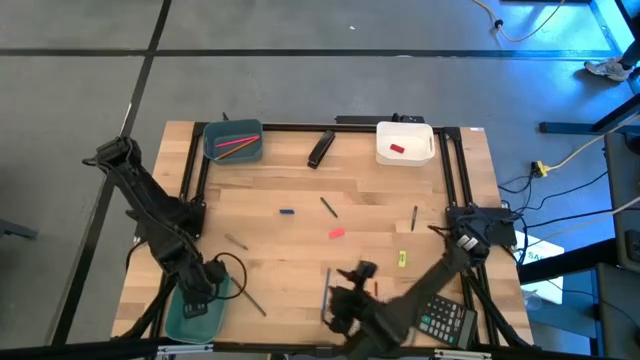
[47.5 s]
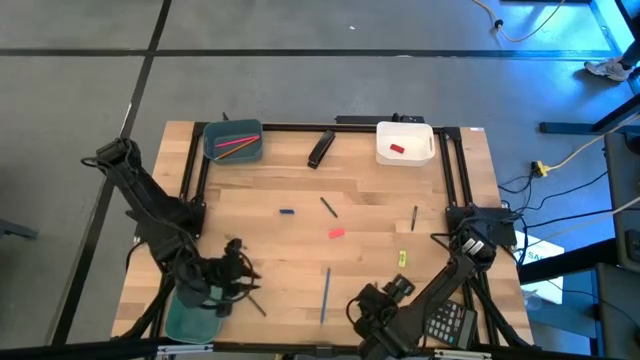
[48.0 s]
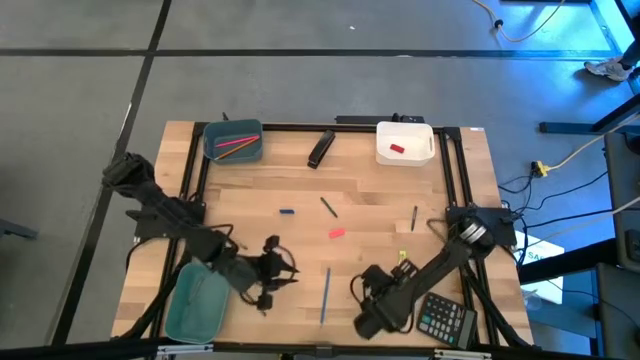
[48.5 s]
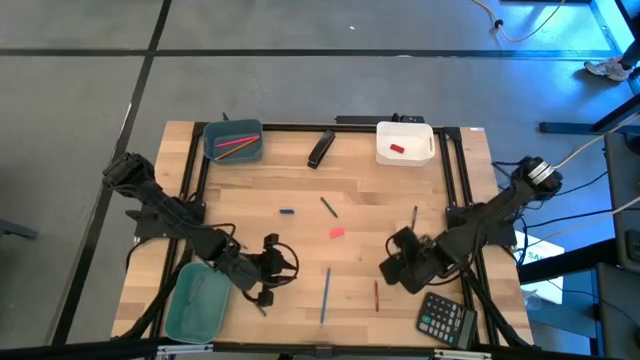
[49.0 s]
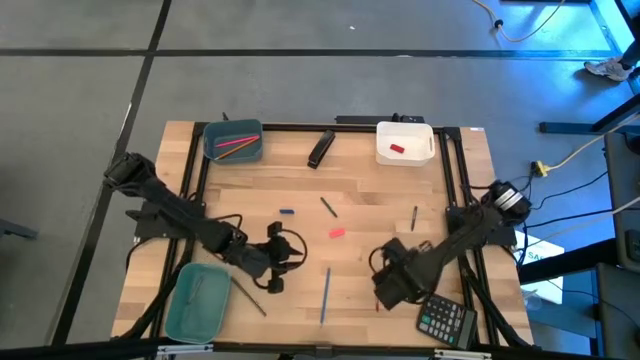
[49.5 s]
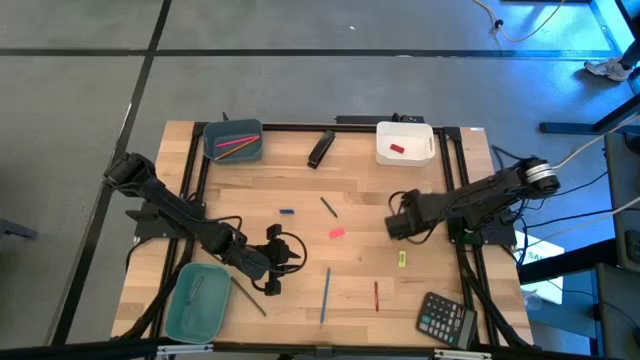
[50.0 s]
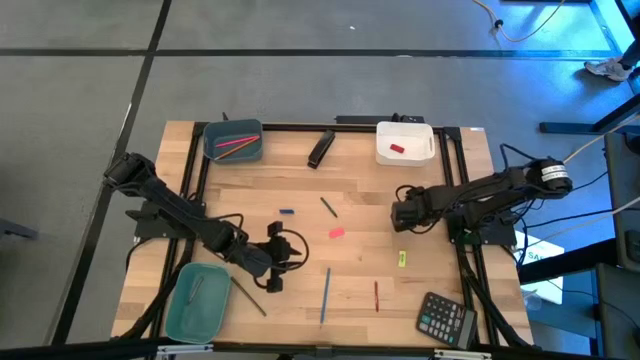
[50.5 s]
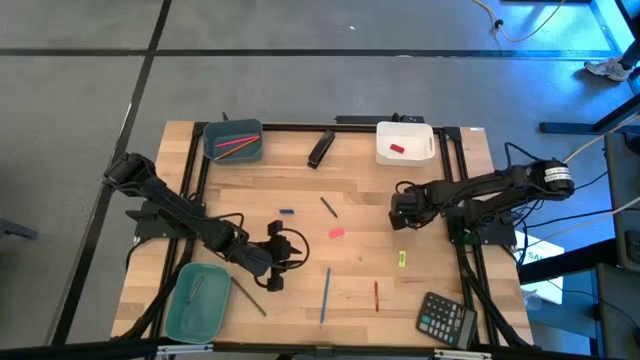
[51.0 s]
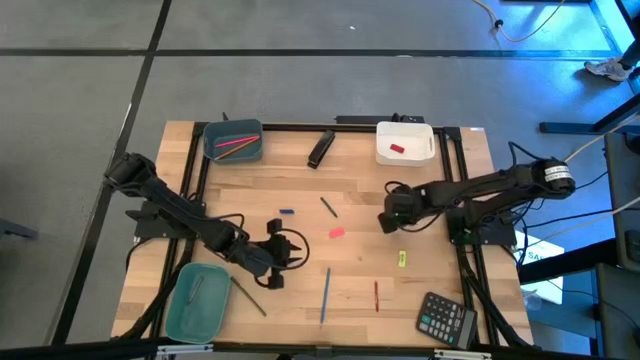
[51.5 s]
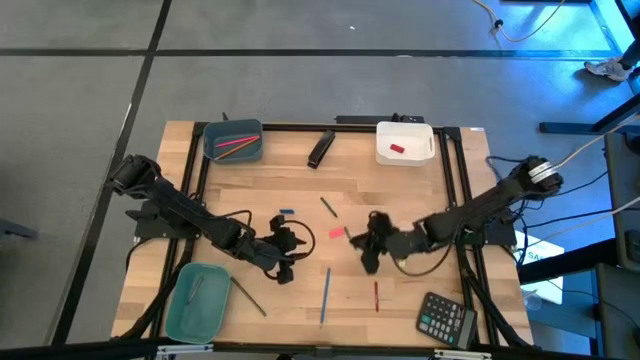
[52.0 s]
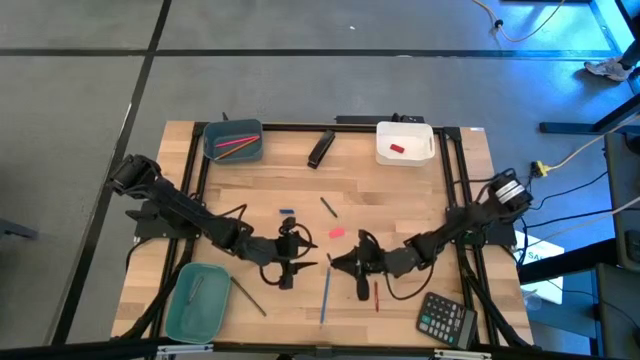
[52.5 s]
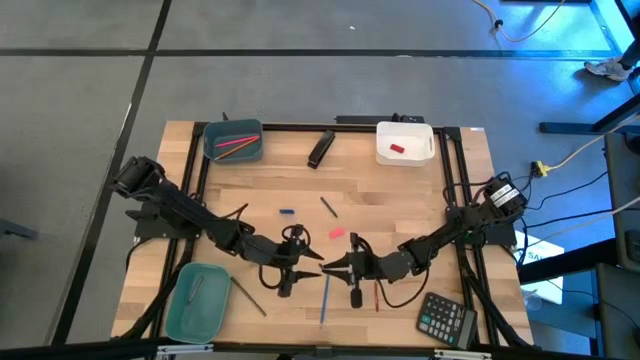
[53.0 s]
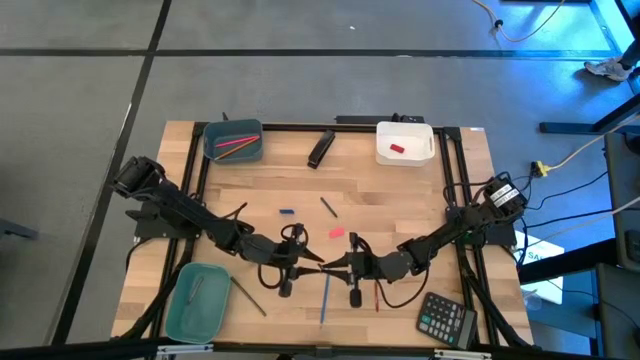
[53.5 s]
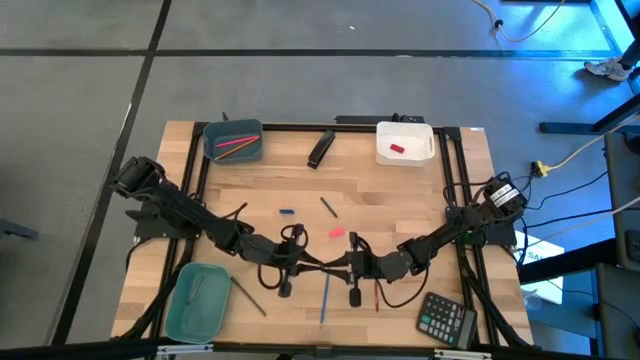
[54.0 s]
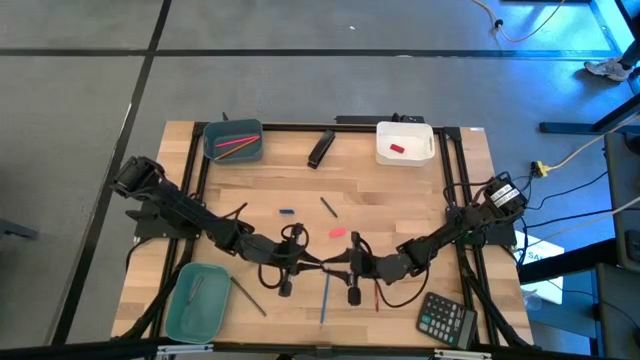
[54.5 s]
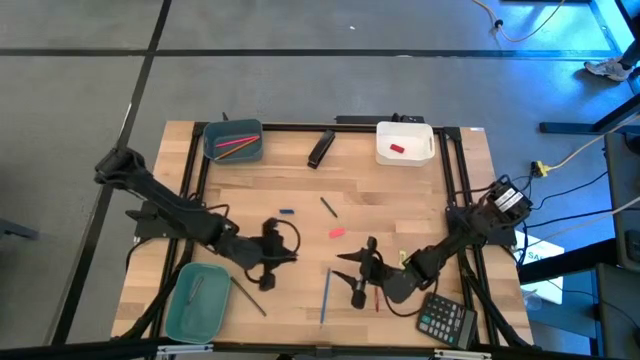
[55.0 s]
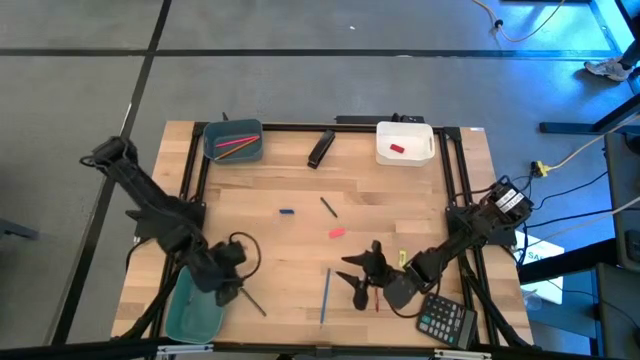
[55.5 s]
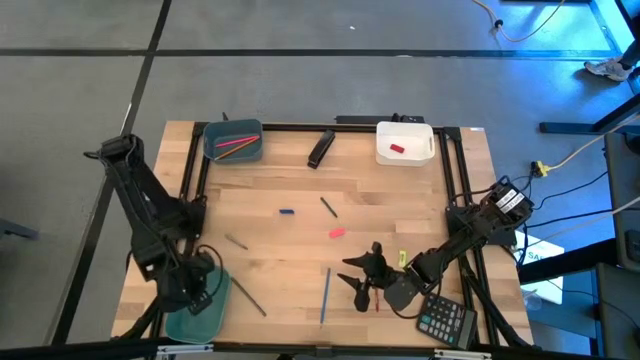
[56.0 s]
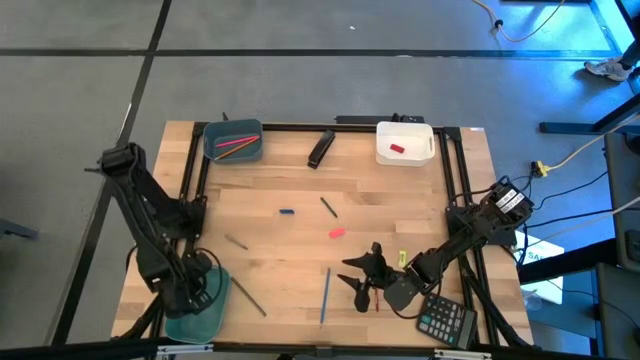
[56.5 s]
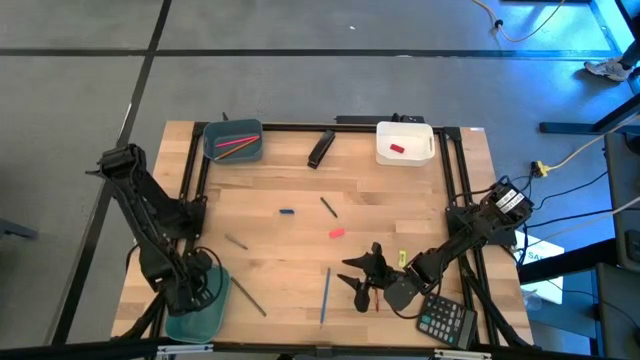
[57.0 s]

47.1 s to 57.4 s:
Task: Sort crayons/erasers/pens/pencils in bins
Put the green crayon into the green bin

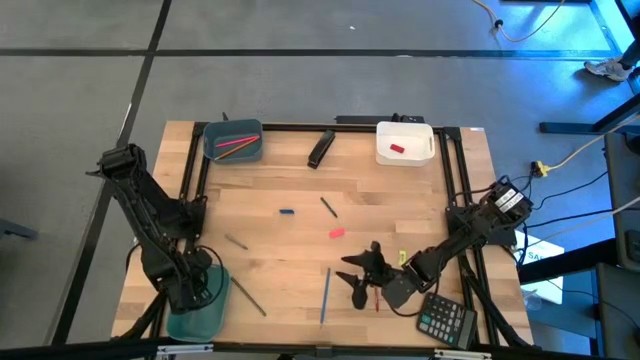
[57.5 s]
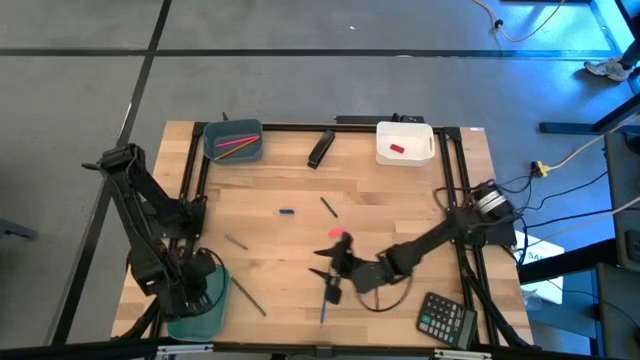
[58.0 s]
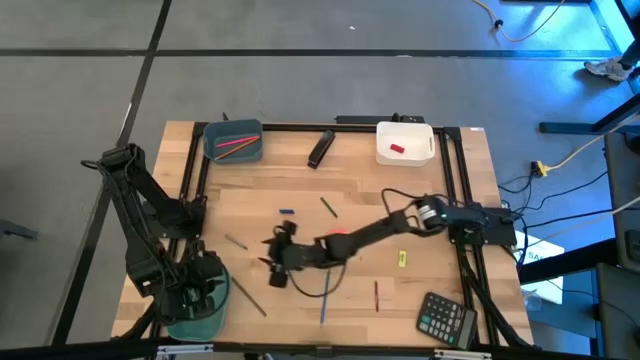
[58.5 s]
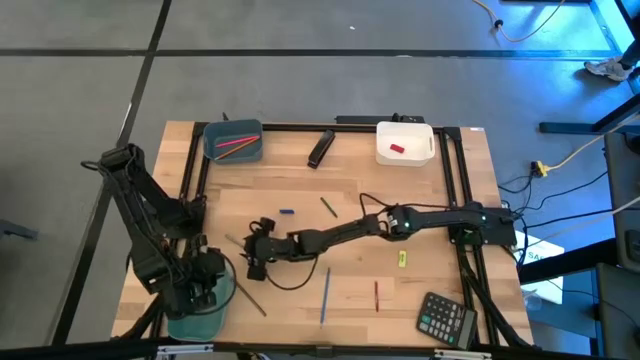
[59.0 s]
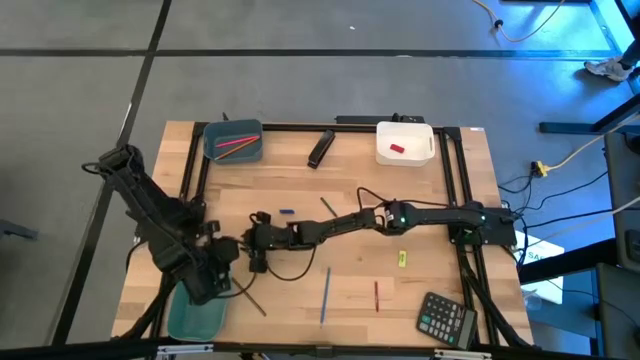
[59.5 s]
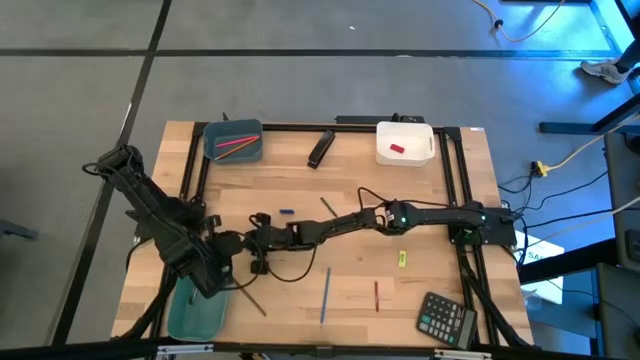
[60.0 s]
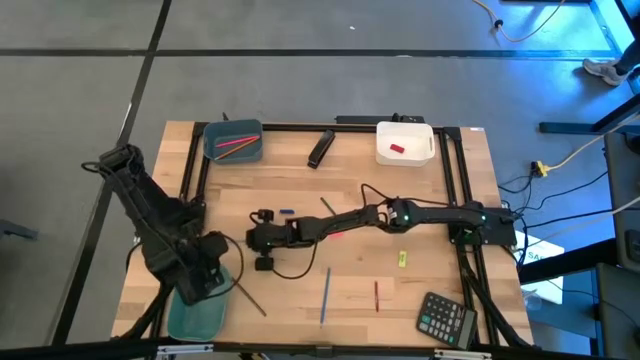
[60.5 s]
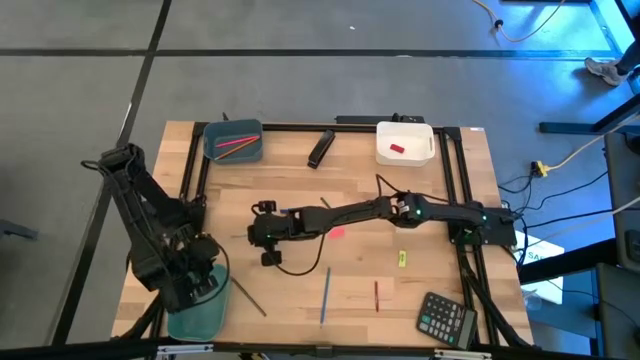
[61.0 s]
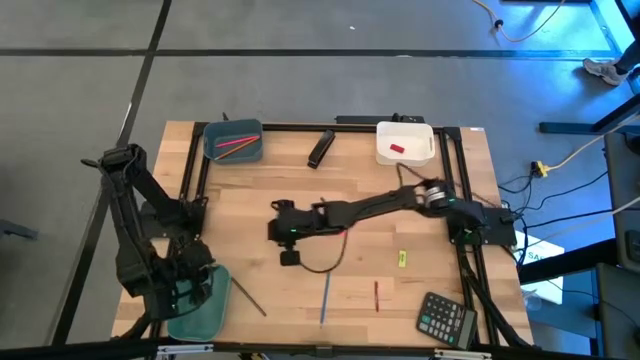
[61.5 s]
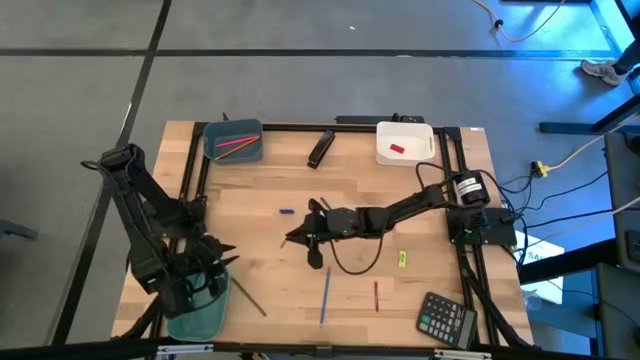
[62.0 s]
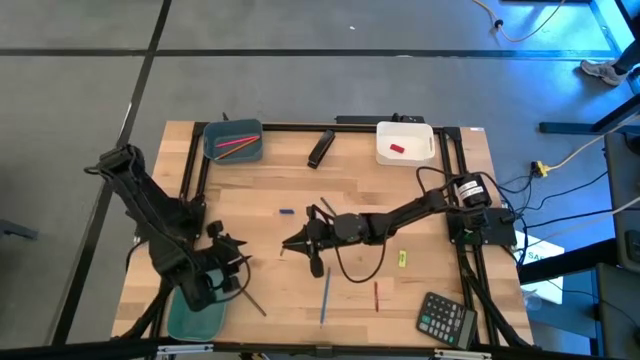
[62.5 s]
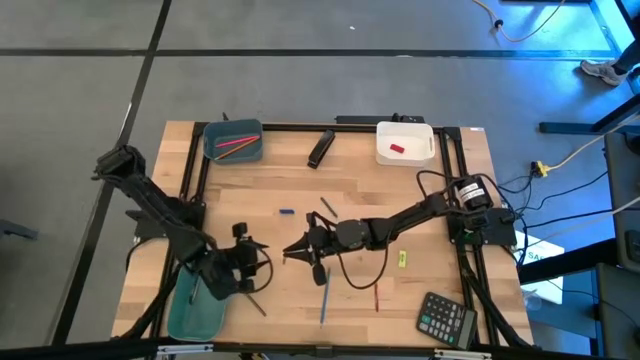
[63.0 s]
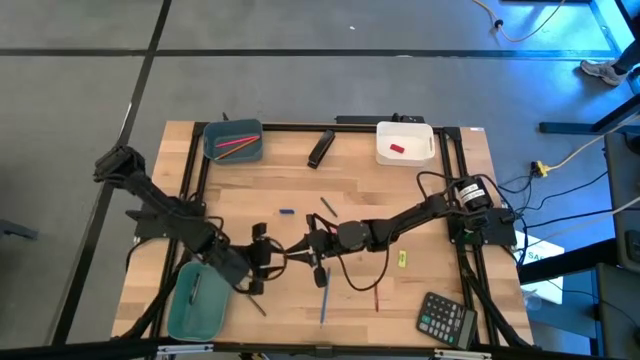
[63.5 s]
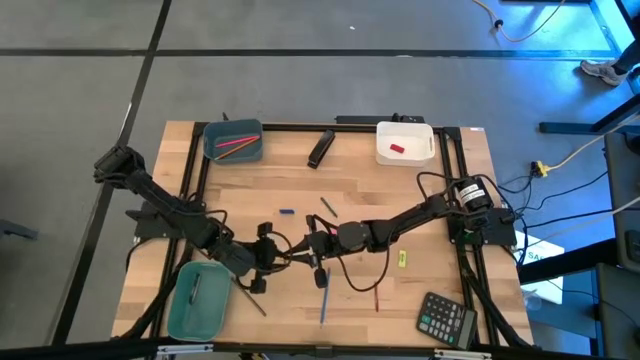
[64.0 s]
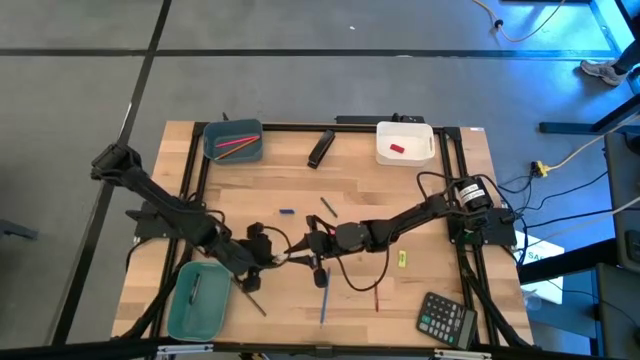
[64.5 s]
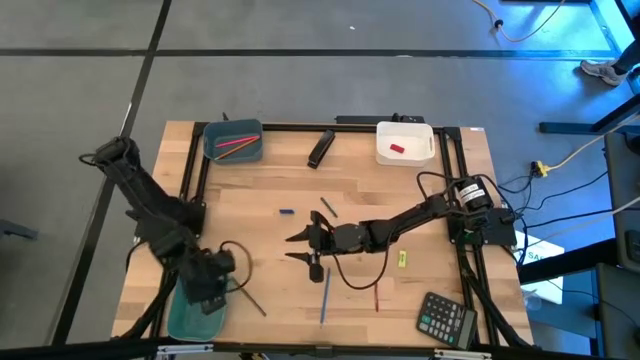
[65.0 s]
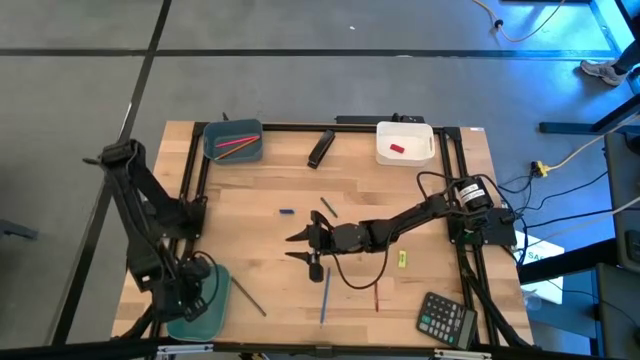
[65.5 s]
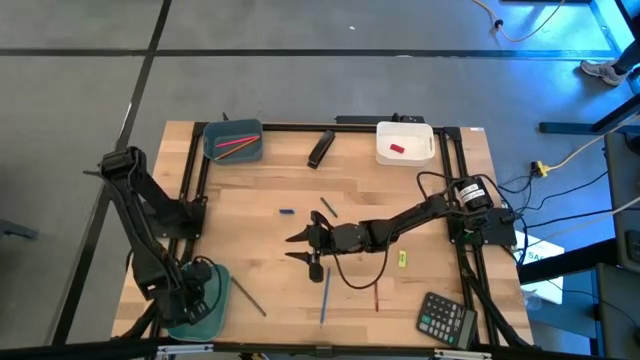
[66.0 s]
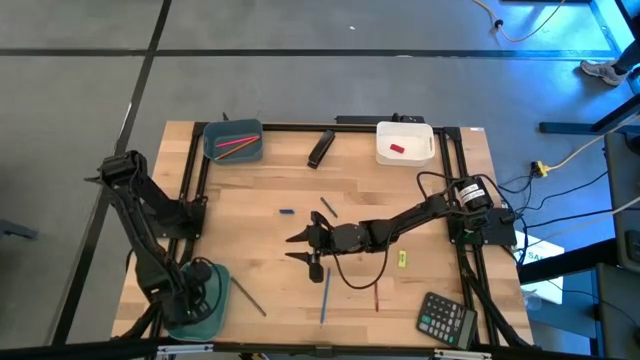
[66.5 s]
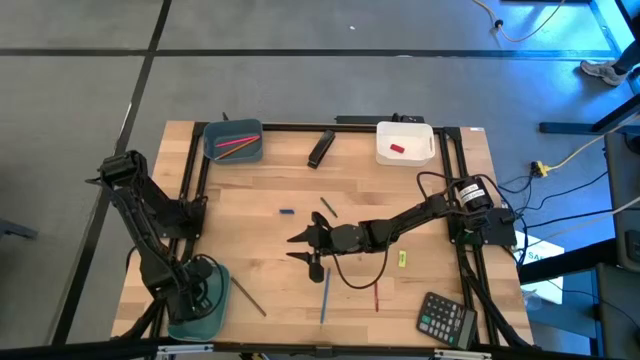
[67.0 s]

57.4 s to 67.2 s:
Put the gray crayon into the green bin

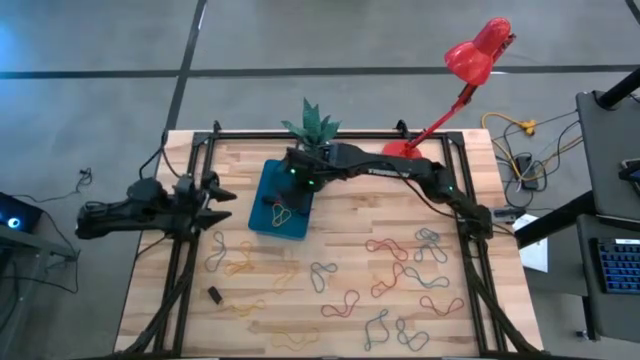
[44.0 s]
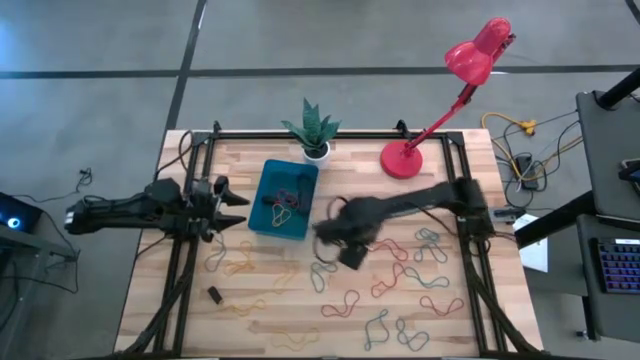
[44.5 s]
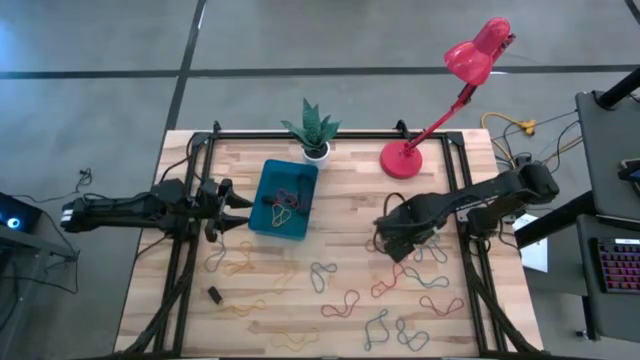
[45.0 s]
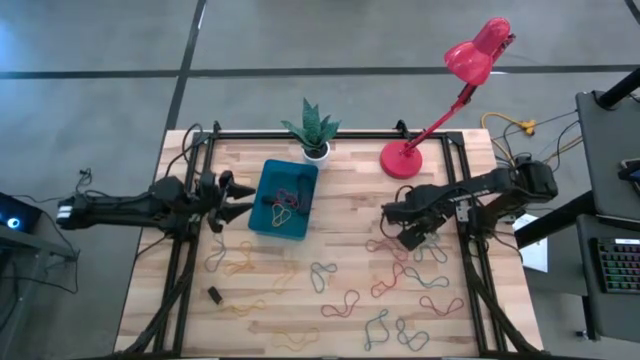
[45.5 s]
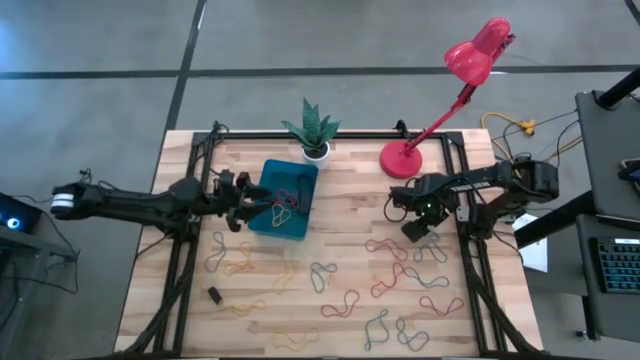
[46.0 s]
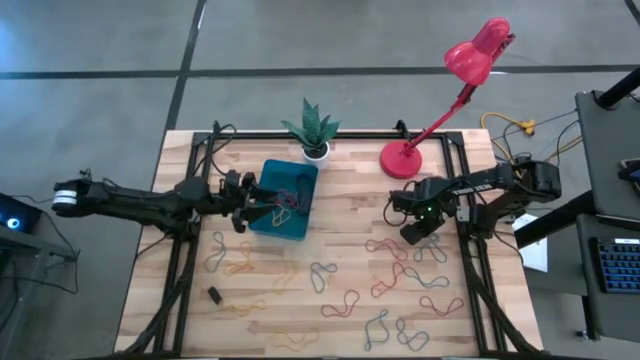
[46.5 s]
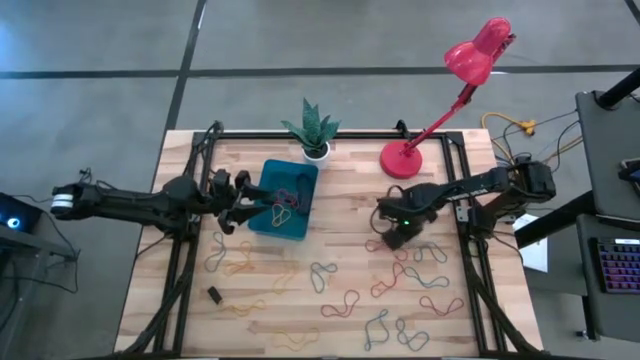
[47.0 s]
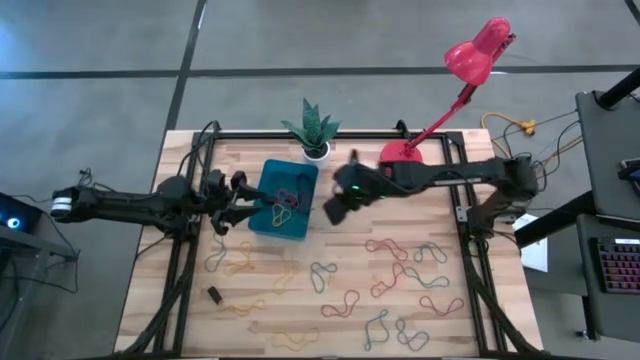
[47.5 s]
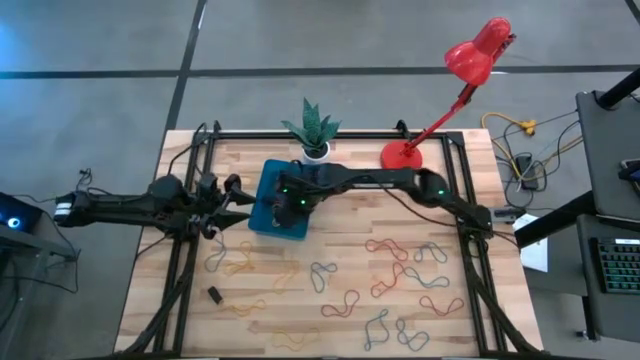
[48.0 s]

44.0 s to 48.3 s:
Task: Pick and place rubber bands into bin
Put the blue rubber band into the blue bin
